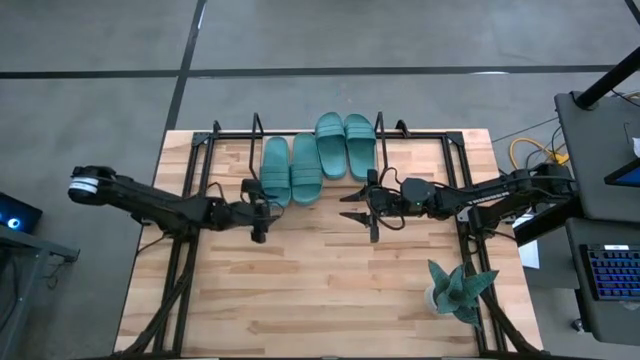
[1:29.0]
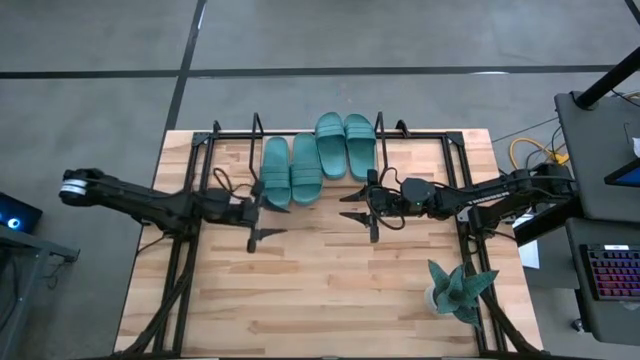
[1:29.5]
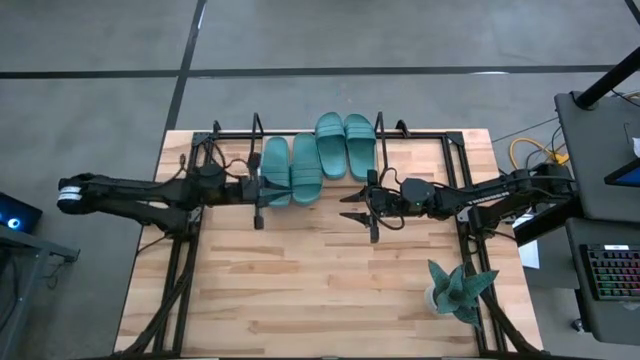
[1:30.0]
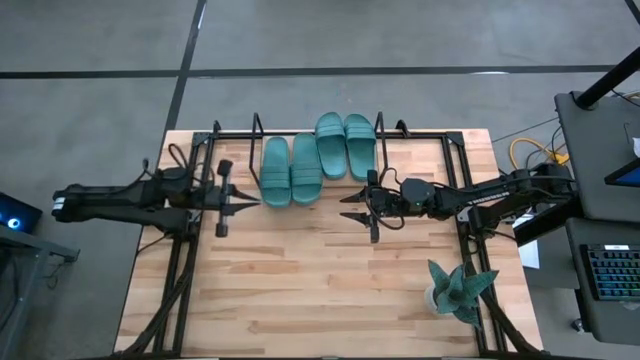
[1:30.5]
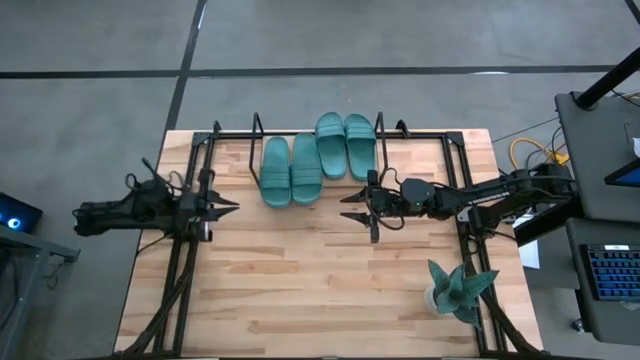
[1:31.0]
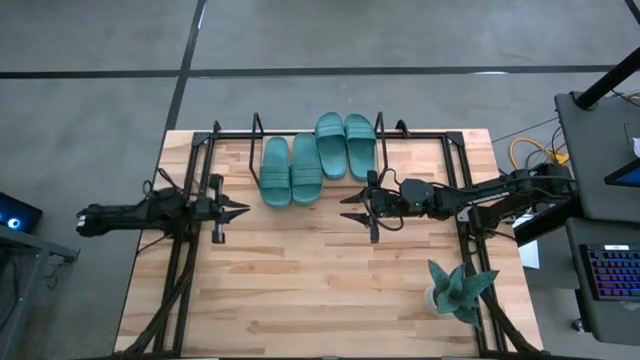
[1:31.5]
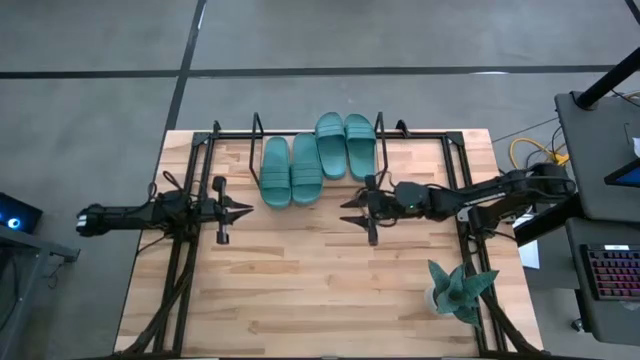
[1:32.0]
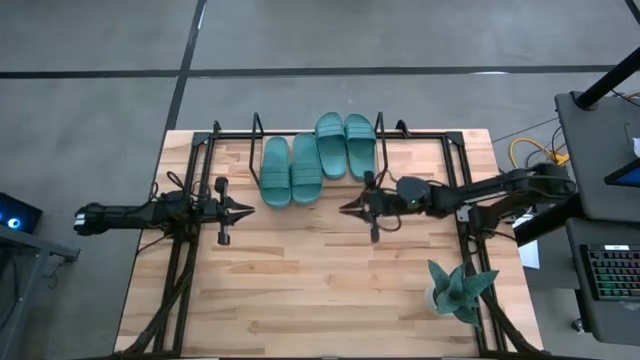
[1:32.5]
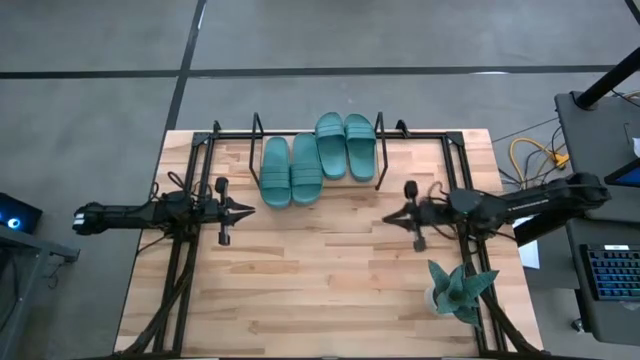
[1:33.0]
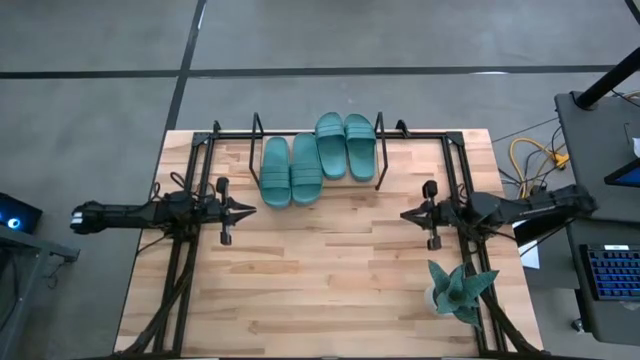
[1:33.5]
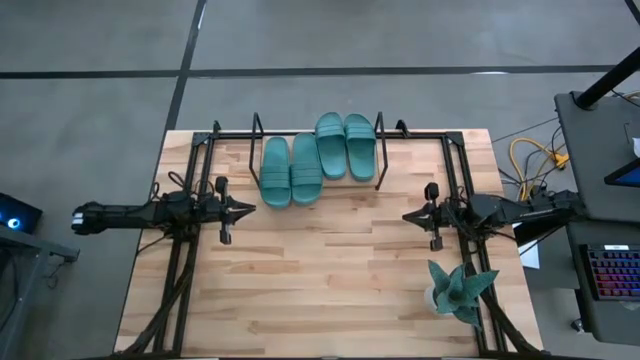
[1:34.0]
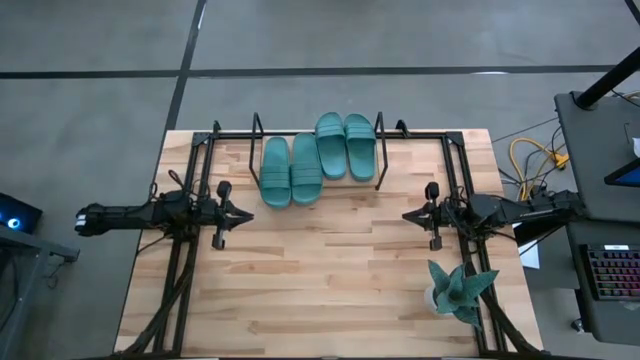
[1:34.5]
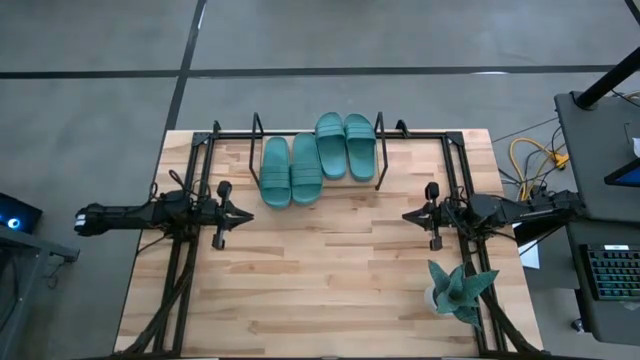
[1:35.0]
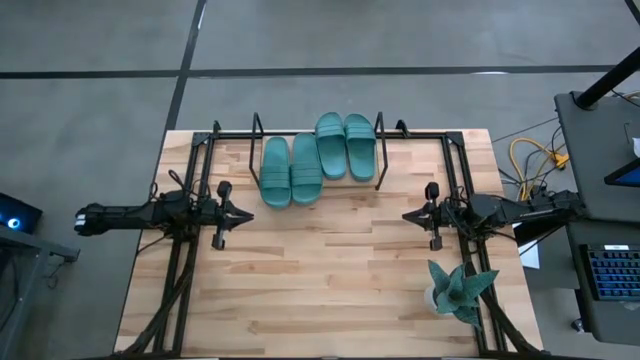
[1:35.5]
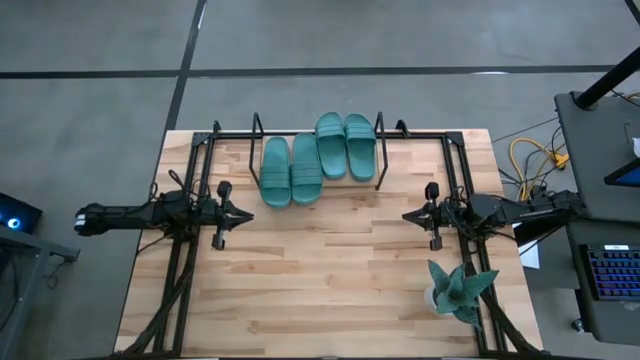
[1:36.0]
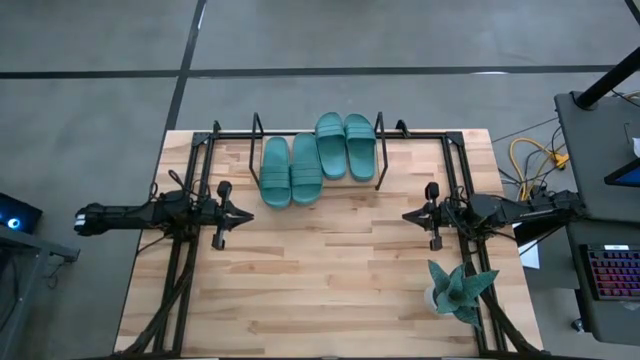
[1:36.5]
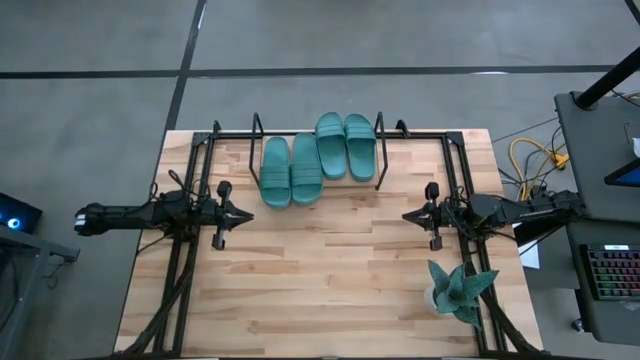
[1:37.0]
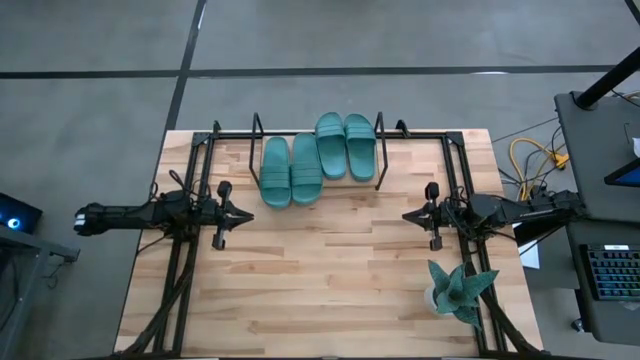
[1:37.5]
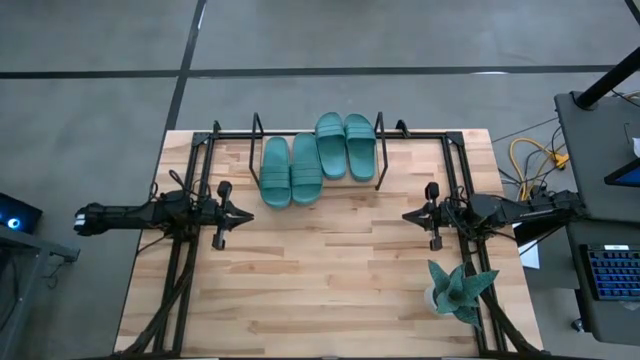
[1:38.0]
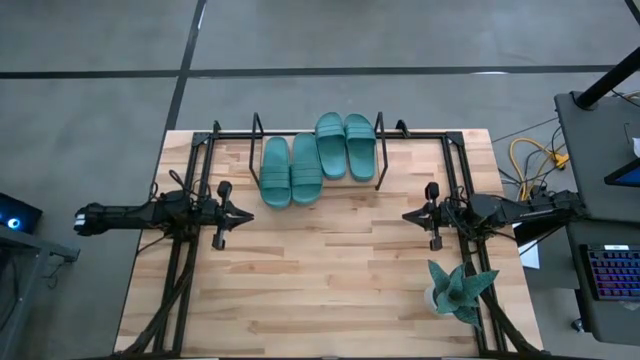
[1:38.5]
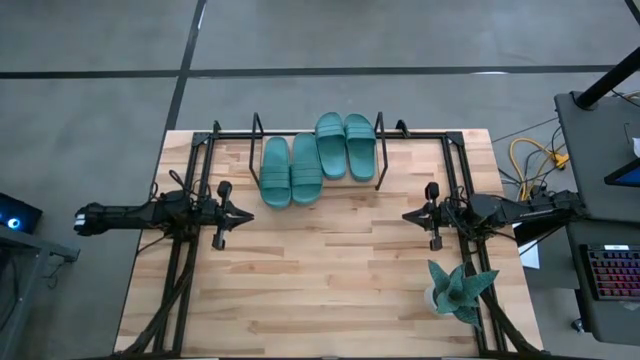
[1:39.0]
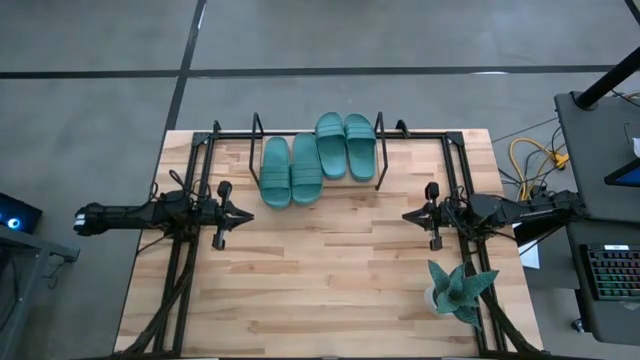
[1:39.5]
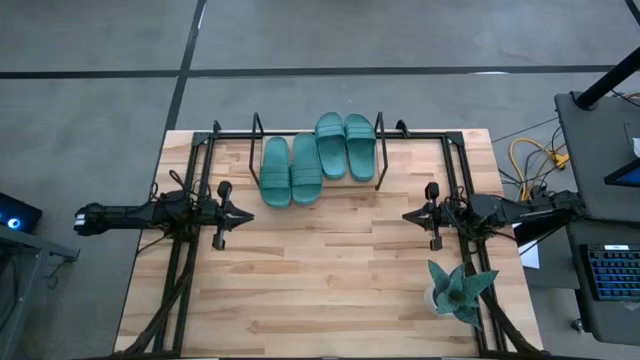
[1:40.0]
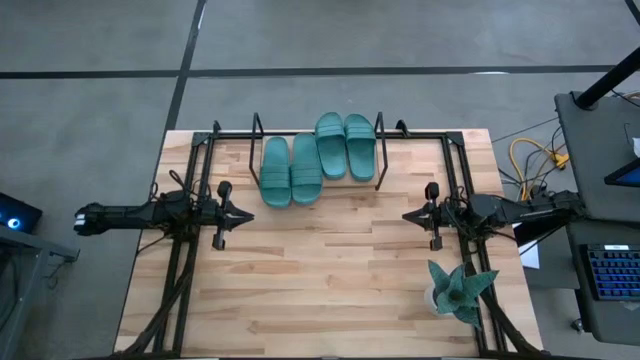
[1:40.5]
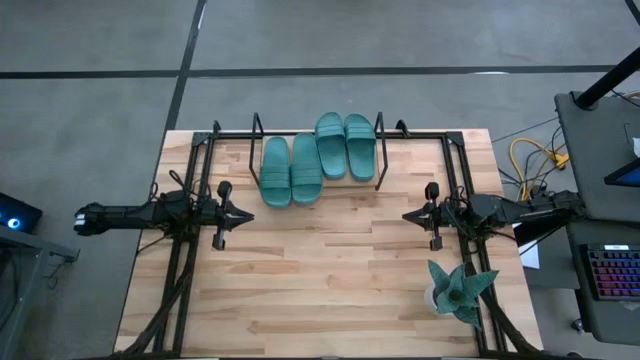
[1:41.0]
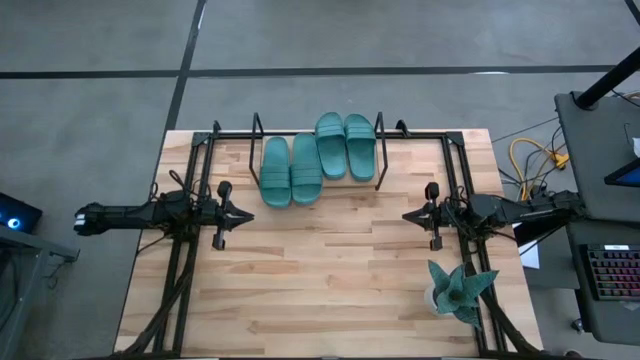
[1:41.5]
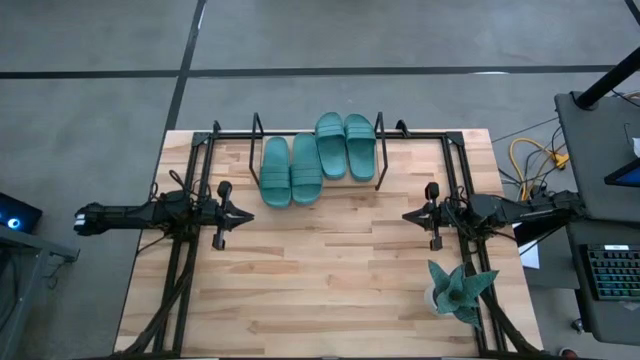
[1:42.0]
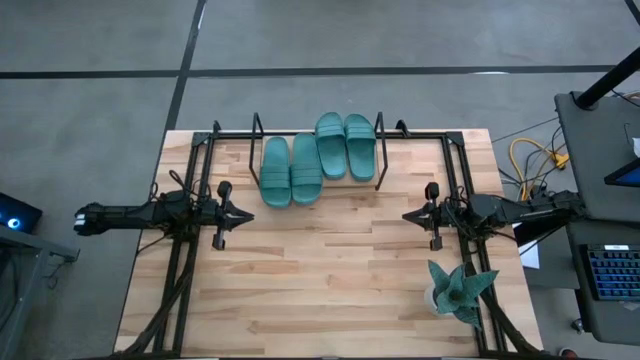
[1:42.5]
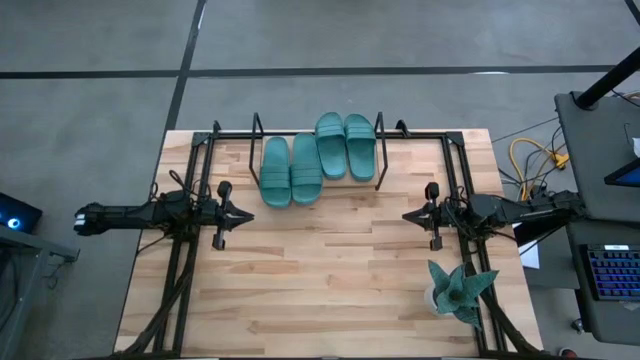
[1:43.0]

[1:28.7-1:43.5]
Task: Pick and place slides into the shelf
Return to Home Position

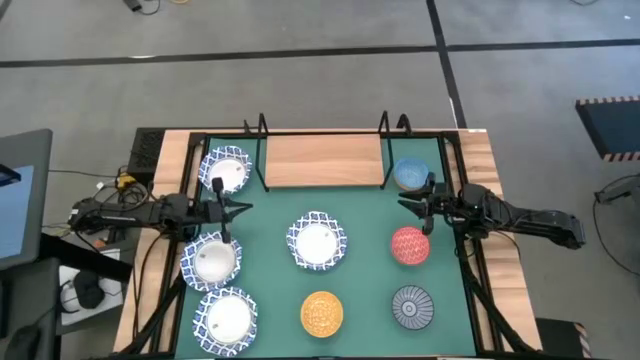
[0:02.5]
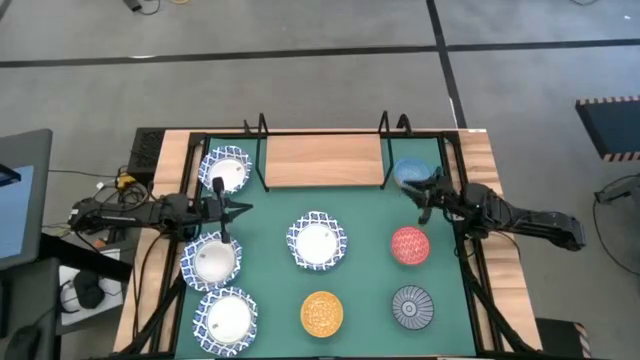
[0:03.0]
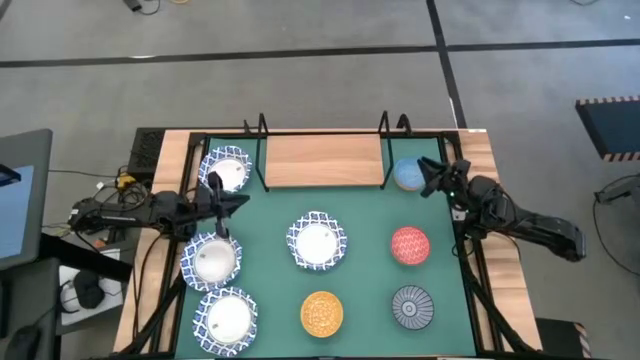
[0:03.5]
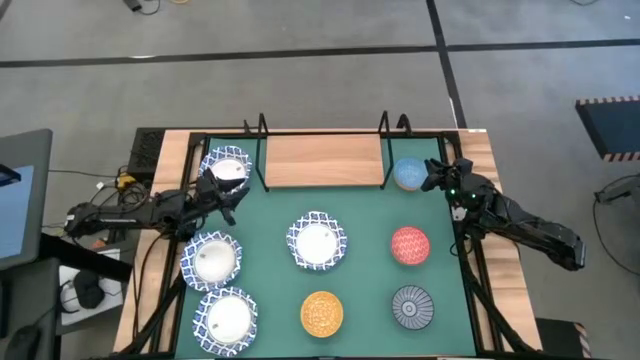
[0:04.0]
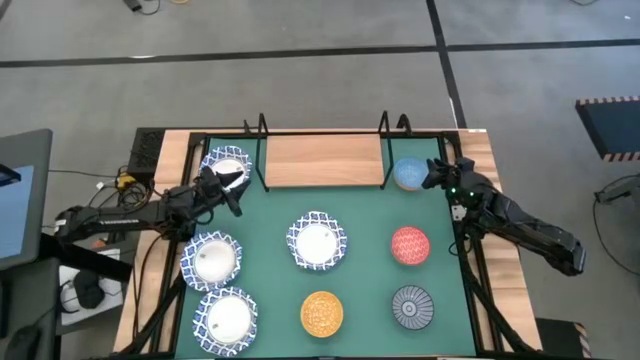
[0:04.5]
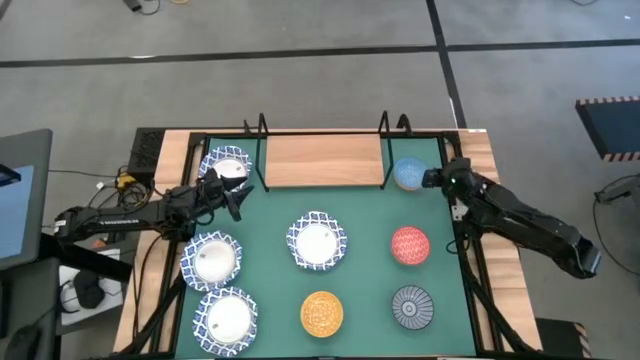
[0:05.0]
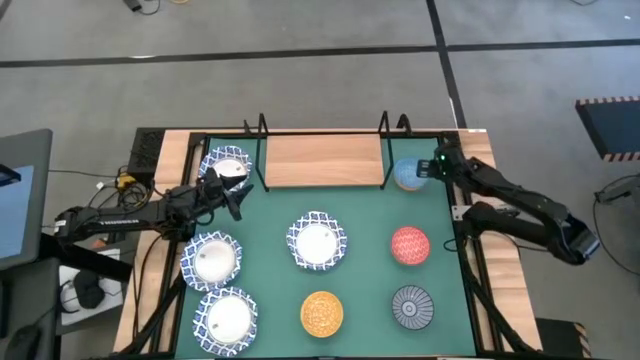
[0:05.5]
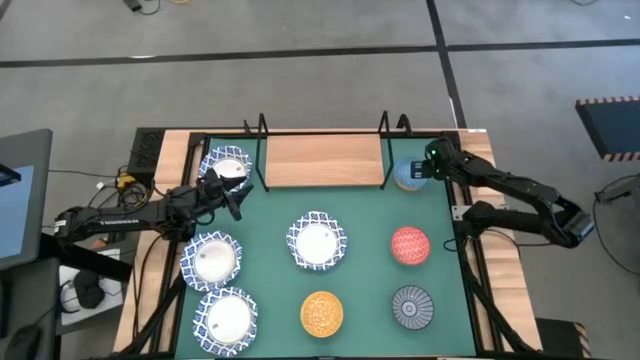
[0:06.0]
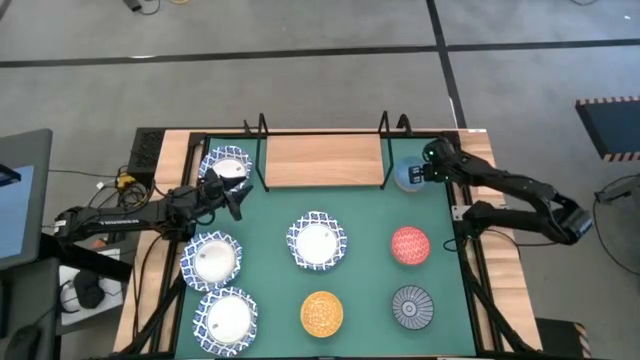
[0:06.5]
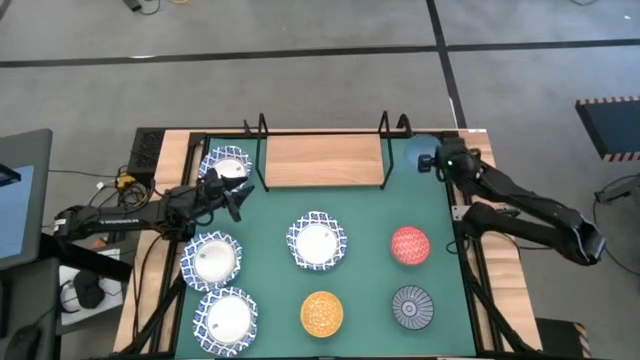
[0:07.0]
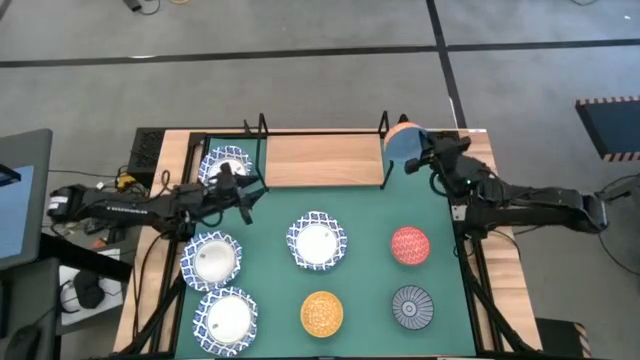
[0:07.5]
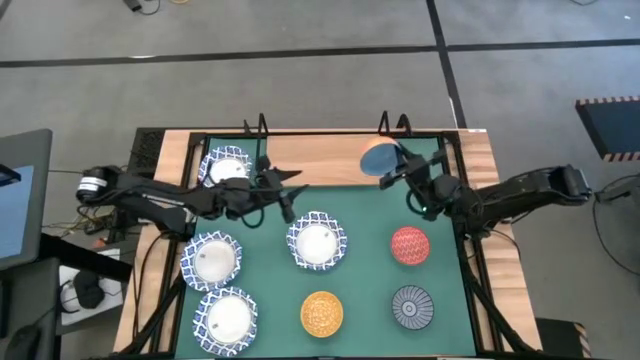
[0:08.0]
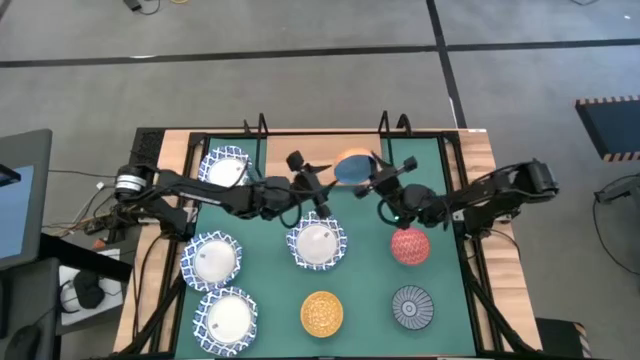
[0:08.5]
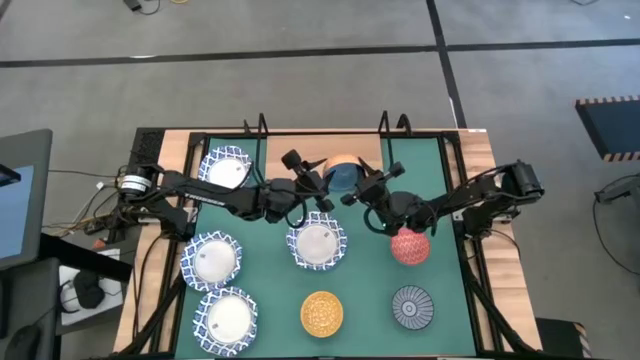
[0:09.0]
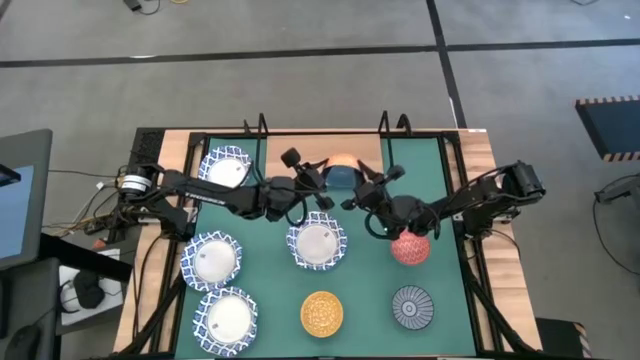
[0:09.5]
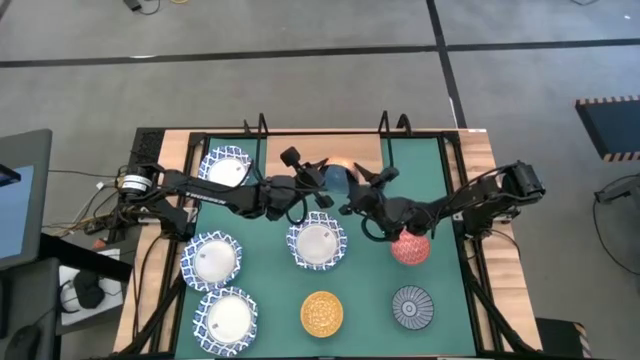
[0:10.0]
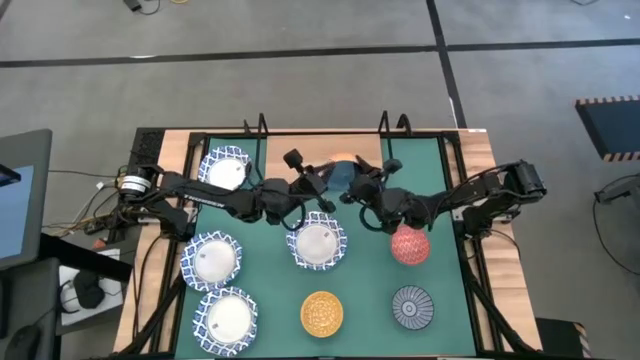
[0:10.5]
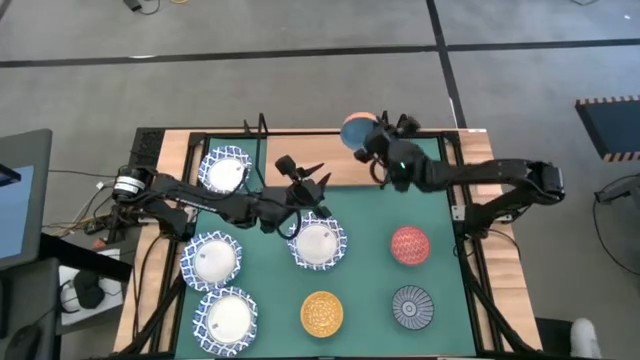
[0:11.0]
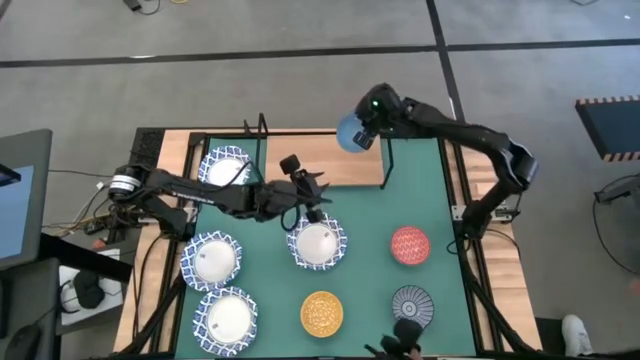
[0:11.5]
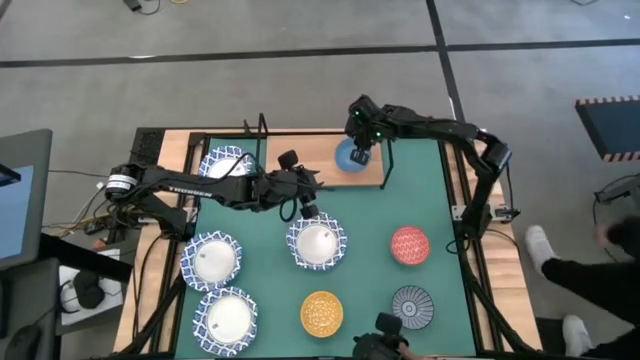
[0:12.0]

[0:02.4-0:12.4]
Task: Place and stack bowls onto a shelf
Put the light blue patterned bowl on the shelf
